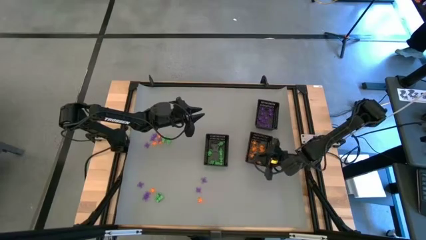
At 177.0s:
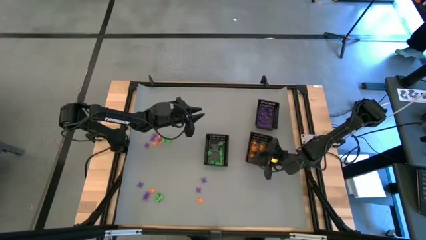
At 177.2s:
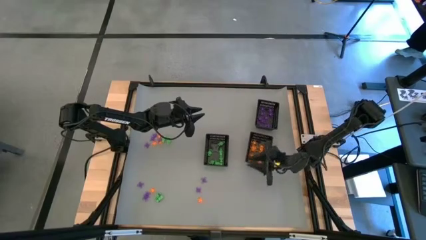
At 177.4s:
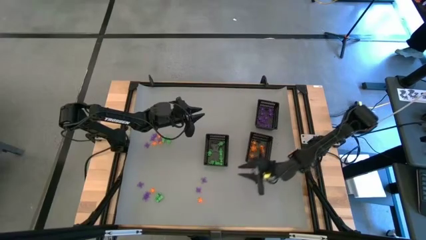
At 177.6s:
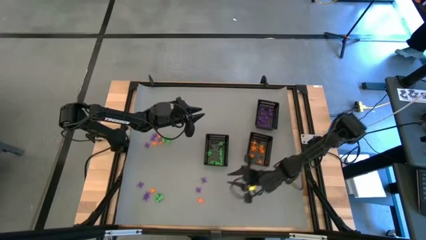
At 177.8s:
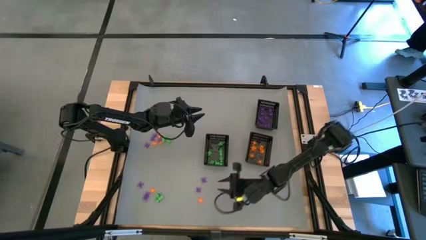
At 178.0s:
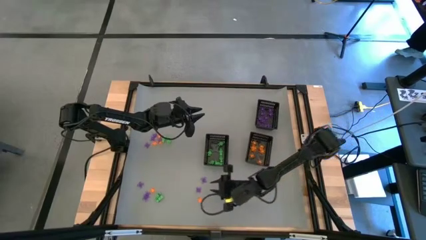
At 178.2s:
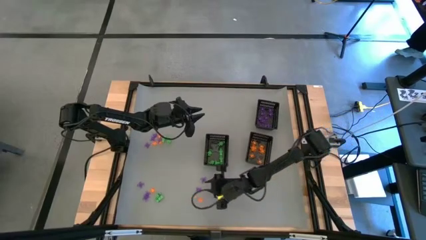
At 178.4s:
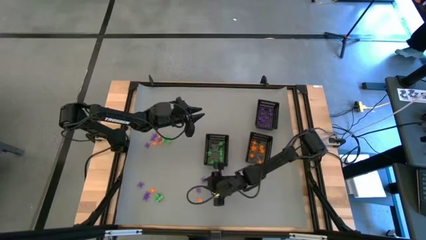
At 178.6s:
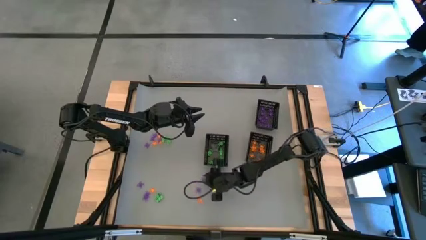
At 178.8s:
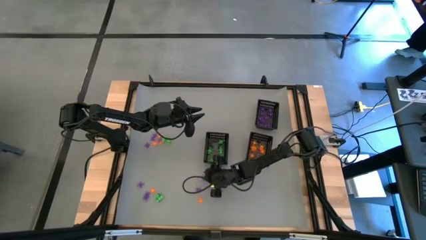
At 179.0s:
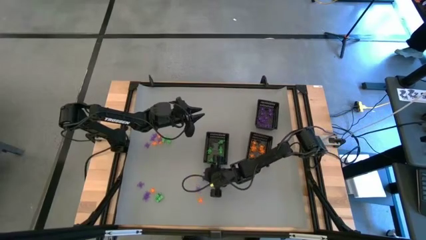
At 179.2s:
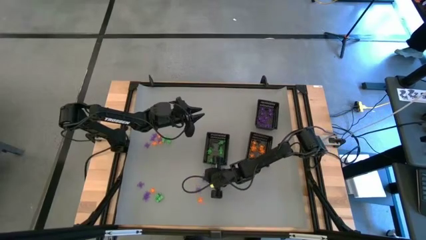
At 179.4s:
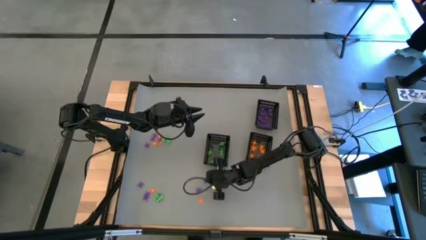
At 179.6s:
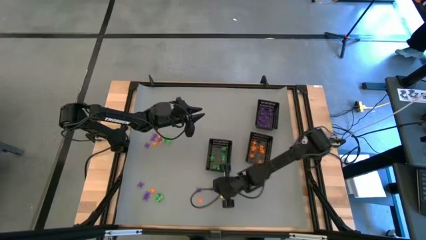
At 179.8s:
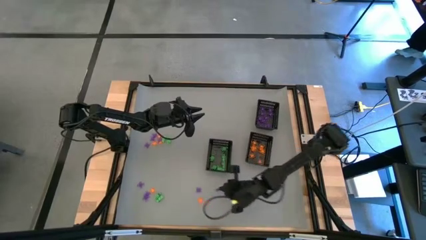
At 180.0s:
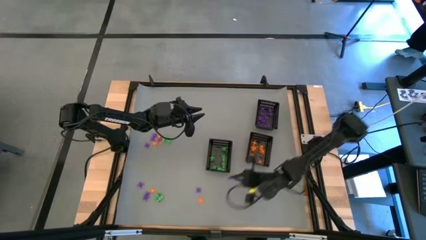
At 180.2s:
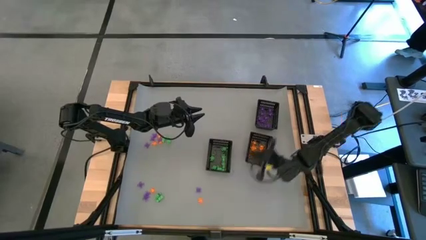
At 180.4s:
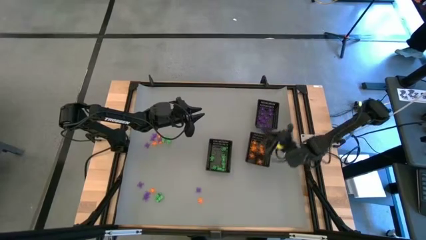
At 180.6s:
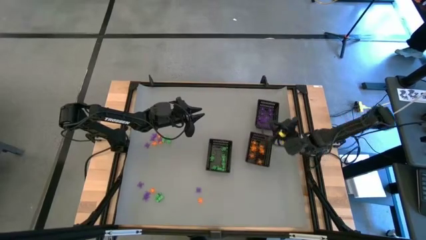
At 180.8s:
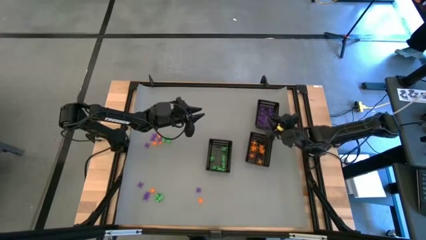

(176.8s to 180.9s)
Task: Sort Halloween decoration
Put the purple spider toy into the top bin

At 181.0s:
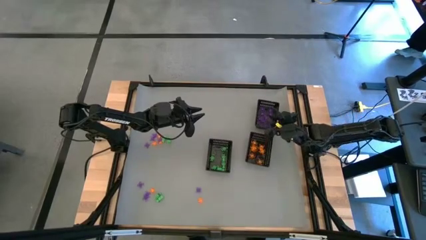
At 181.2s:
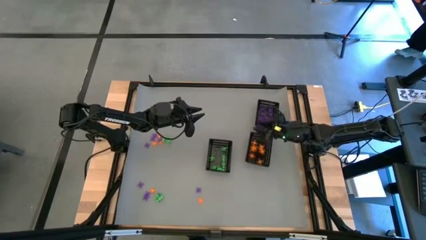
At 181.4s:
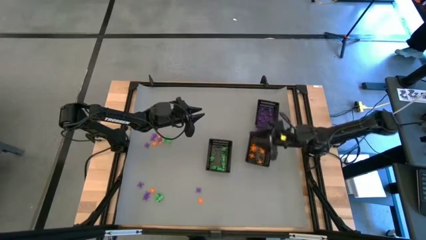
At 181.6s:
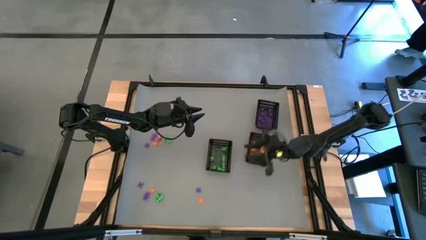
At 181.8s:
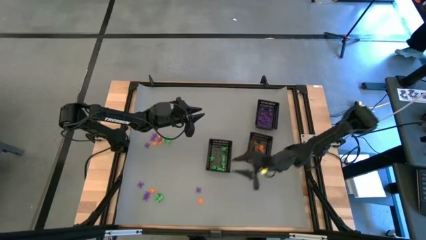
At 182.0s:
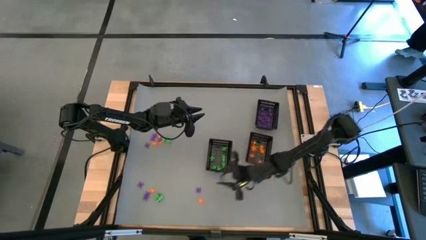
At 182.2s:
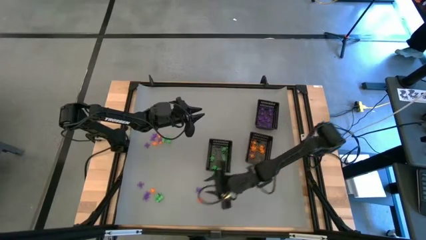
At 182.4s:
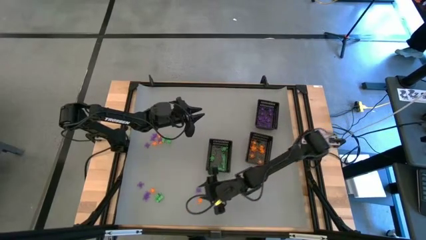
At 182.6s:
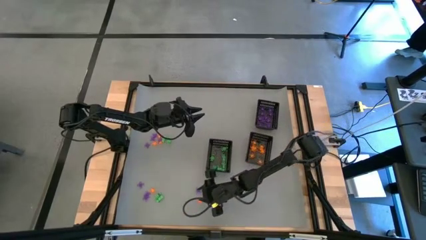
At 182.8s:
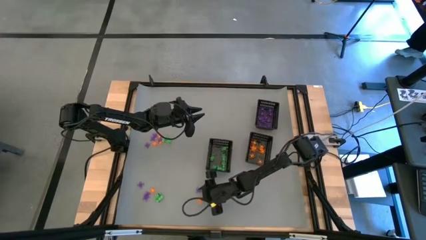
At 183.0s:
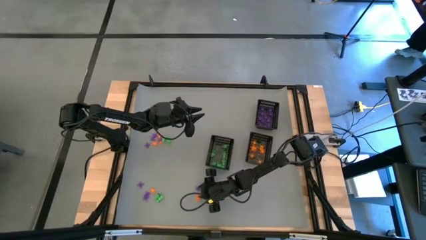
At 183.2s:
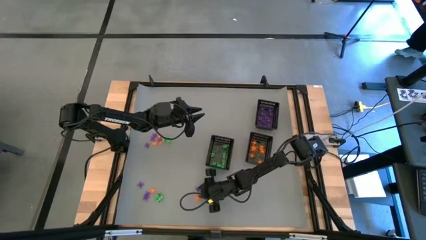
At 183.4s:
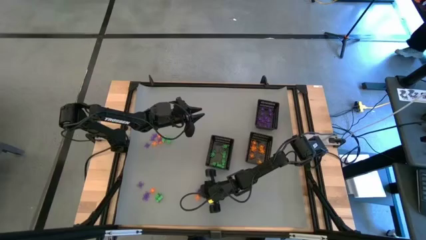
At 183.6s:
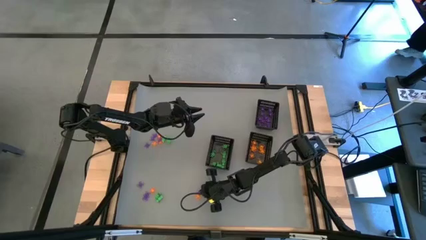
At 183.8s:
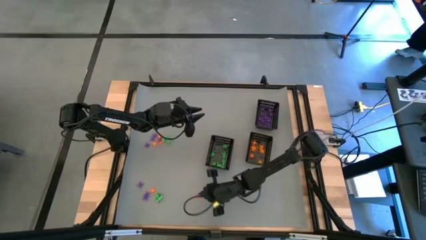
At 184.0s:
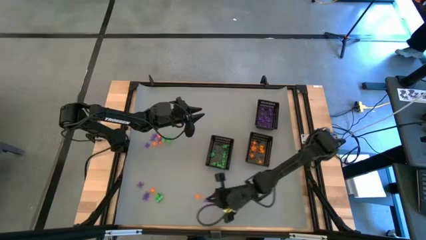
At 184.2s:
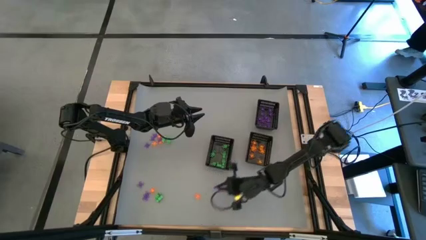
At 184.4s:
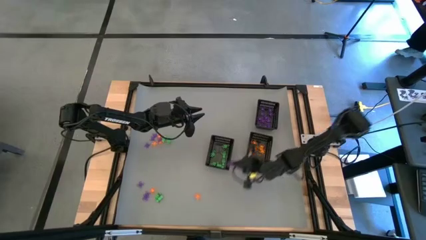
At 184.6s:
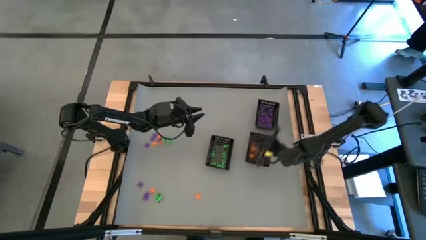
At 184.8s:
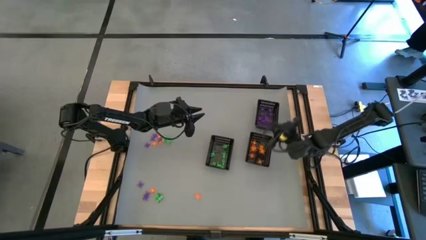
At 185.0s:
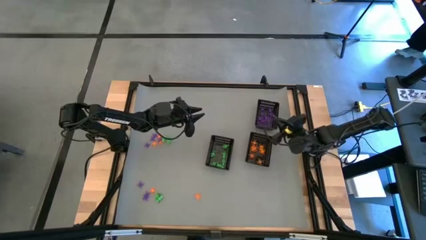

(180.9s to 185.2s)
Put the purple spider toy into the top bin

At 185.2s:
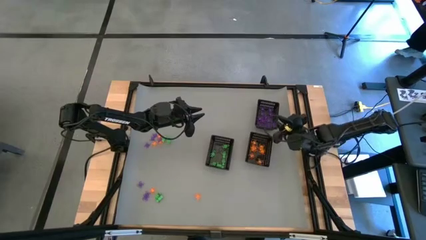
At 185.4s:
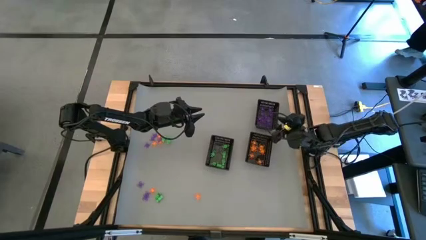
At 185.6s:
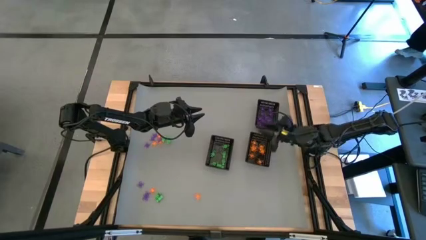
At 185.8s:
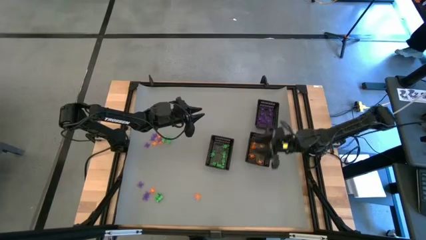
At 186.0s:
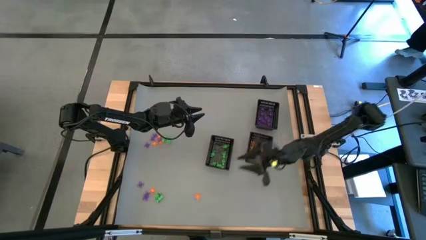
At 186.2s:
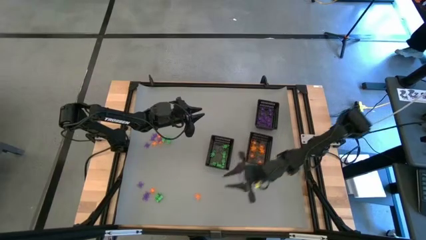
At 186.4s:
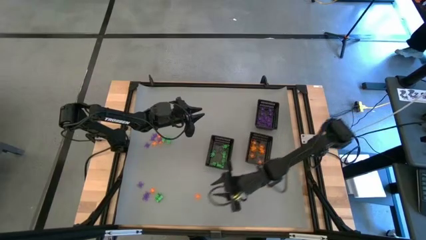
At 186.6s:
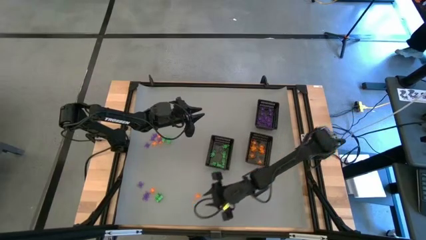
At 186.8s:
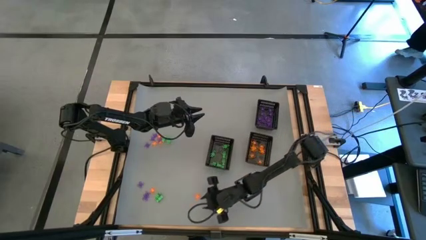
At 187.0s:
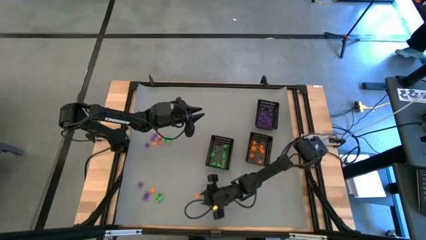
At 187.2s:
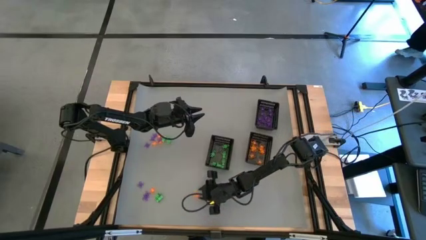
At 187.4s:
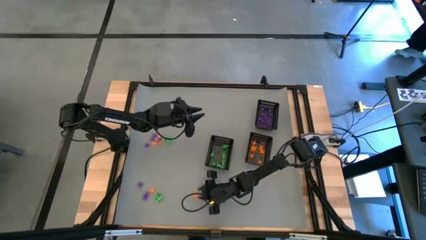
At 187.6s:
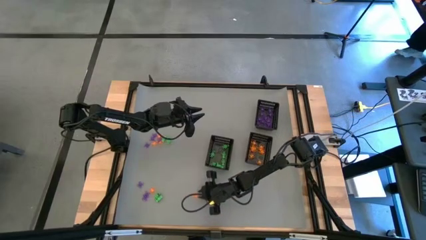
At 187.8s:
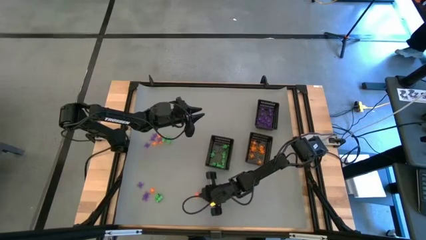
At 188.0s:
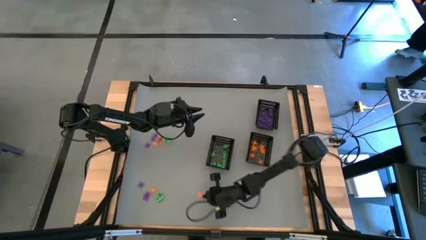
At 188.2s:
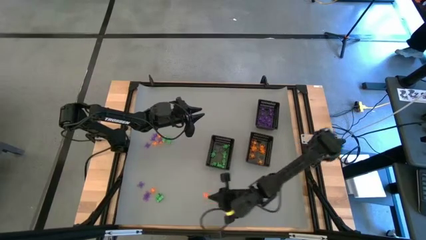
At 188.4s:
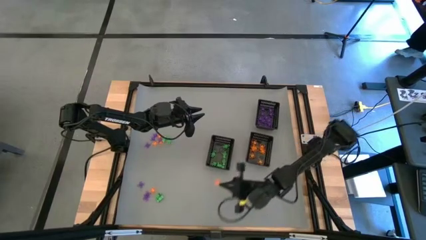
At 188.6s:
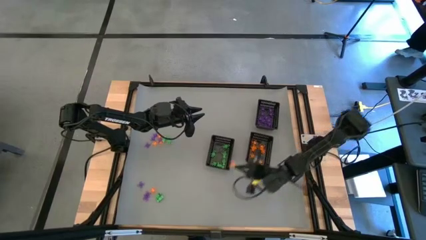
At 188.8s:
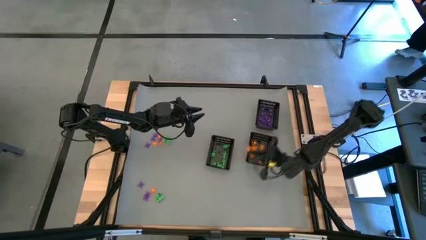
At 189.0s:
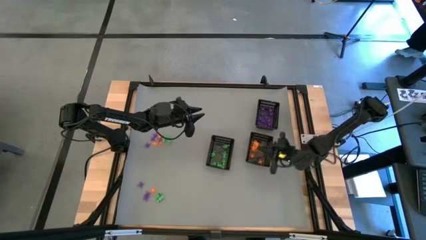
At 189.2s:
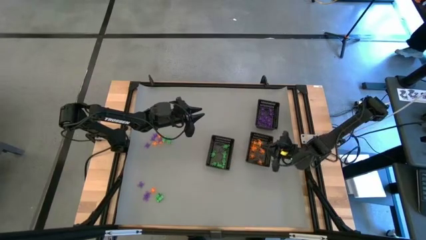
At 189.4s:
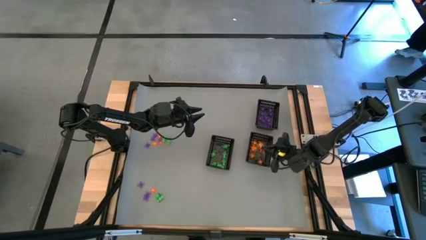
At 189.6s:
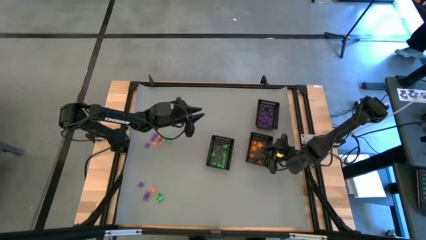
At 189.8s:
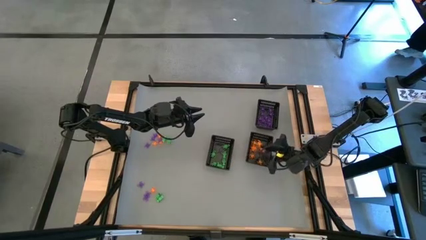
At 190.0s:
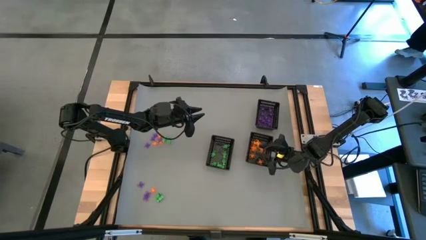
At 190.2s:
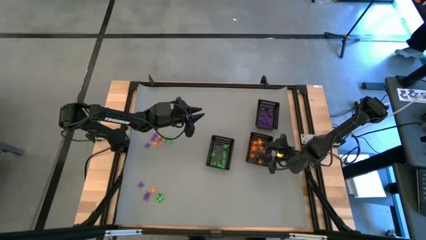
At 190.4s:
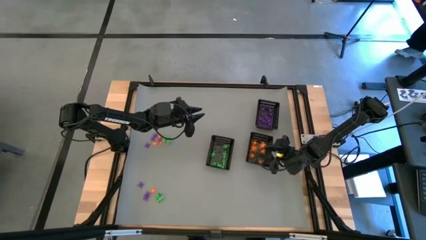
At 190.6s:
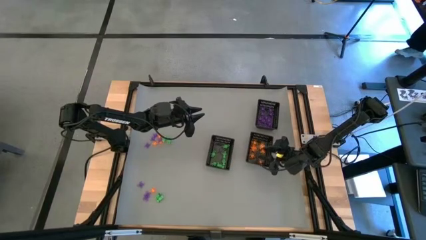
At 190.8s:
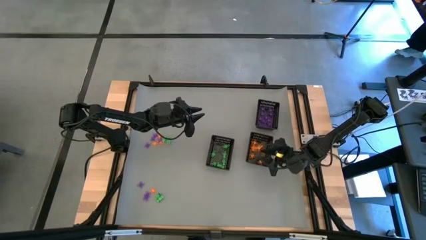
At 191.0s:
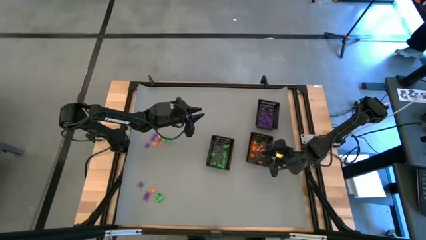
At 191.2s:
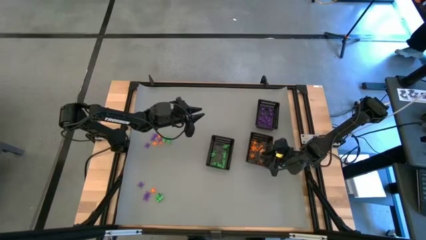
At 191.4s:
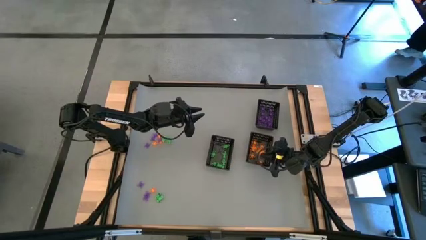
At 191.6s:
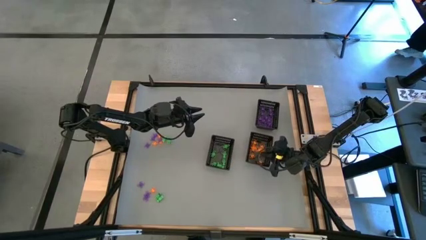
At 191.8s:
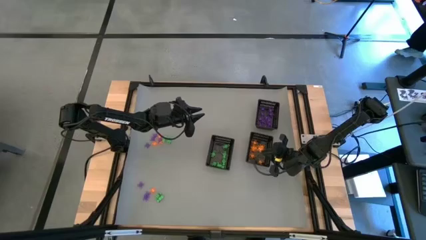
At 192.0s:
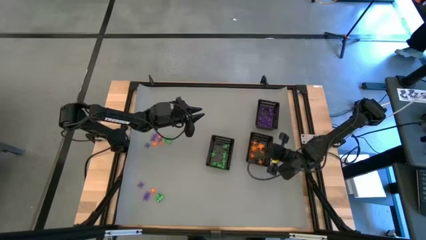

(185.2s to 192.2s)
Put the orange spider toy into the bottom right bin
